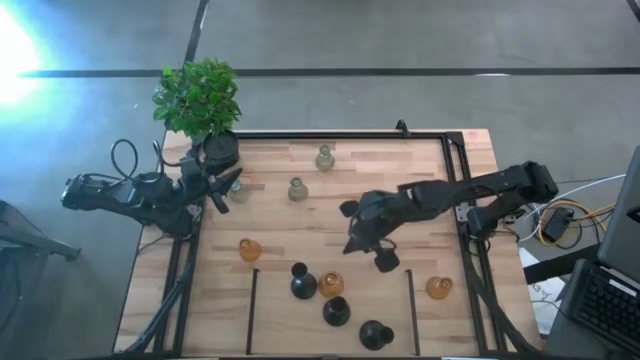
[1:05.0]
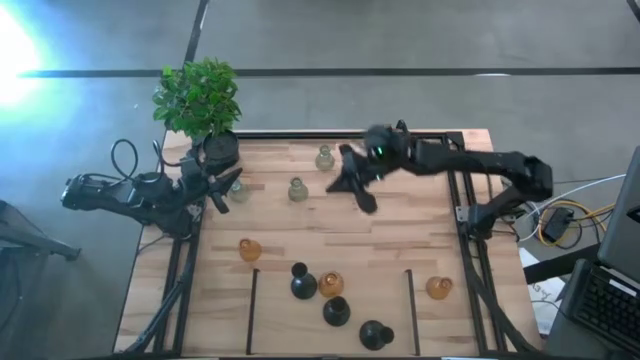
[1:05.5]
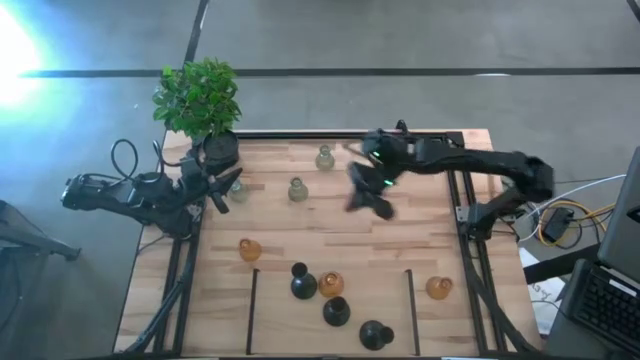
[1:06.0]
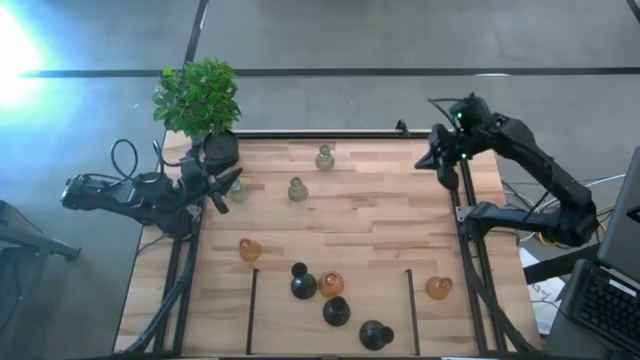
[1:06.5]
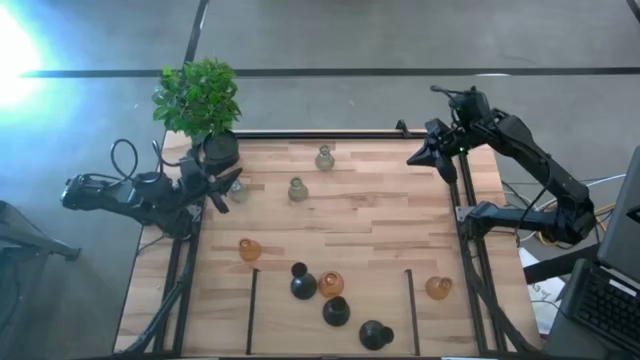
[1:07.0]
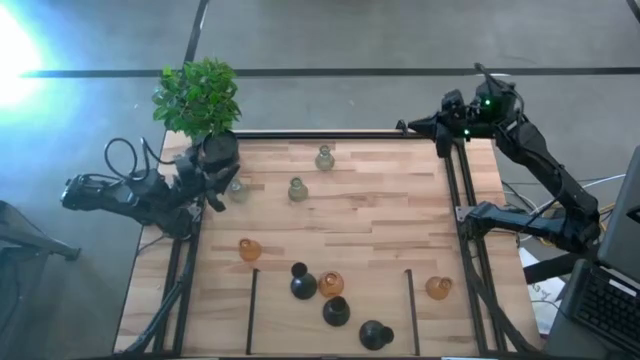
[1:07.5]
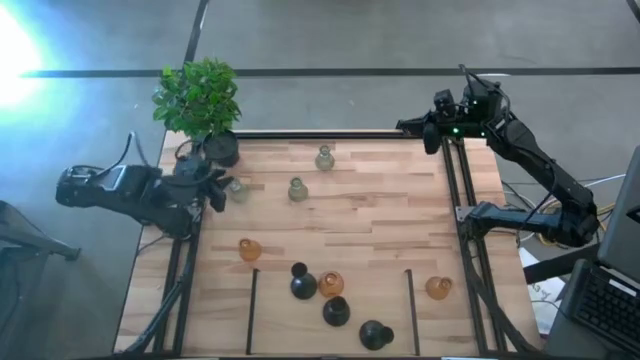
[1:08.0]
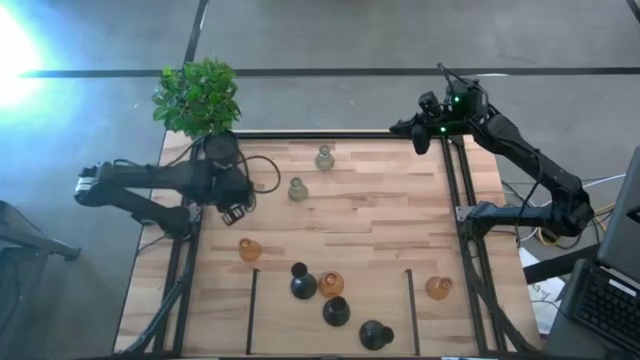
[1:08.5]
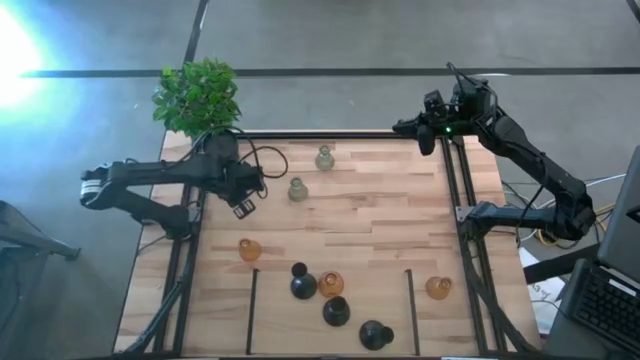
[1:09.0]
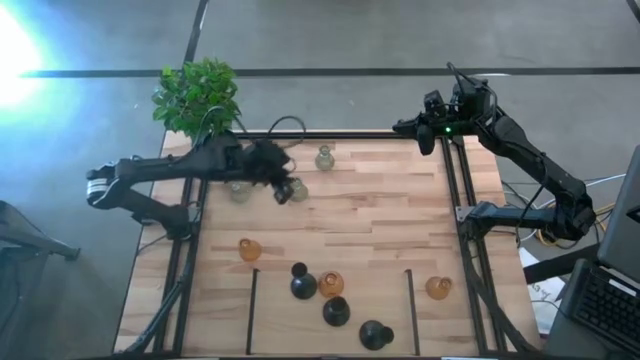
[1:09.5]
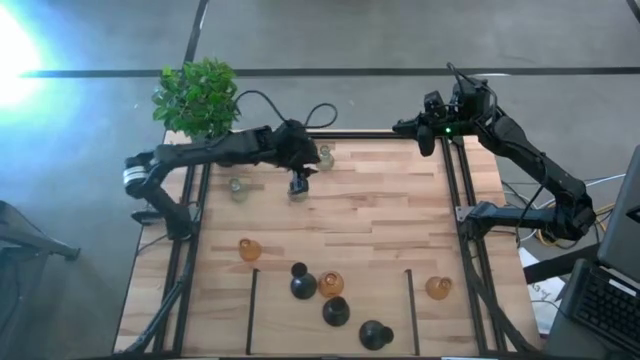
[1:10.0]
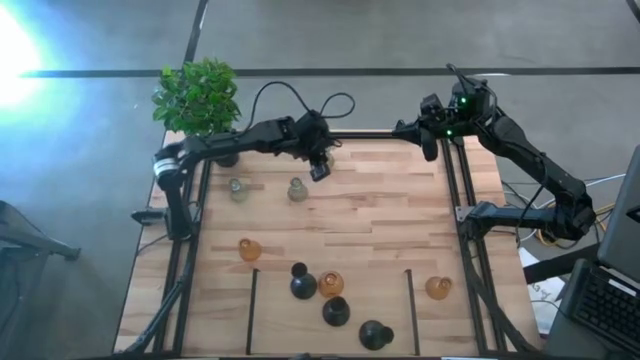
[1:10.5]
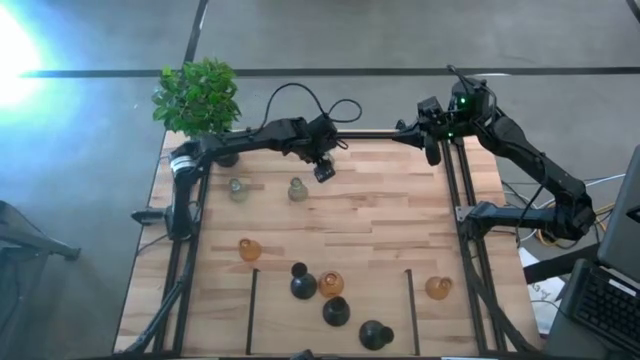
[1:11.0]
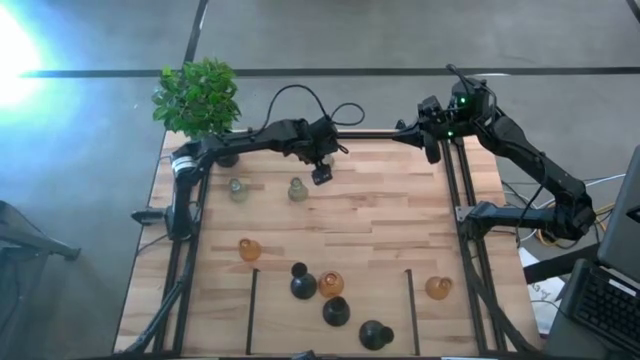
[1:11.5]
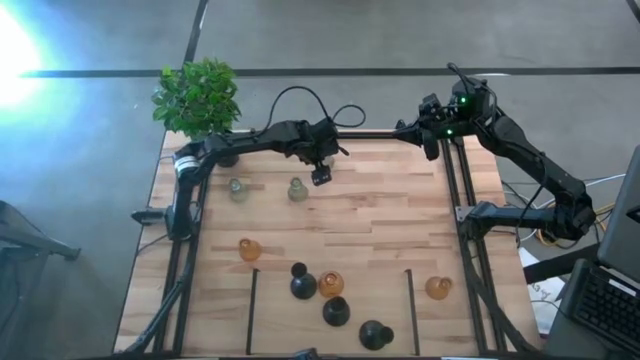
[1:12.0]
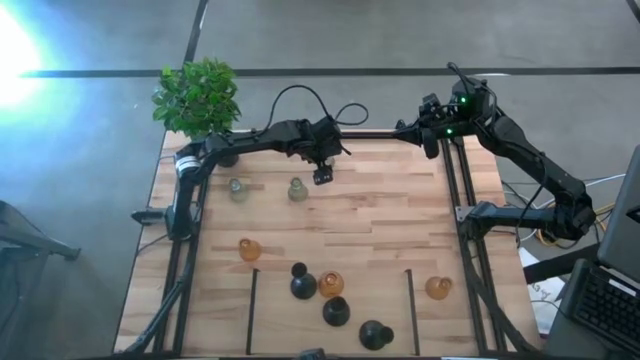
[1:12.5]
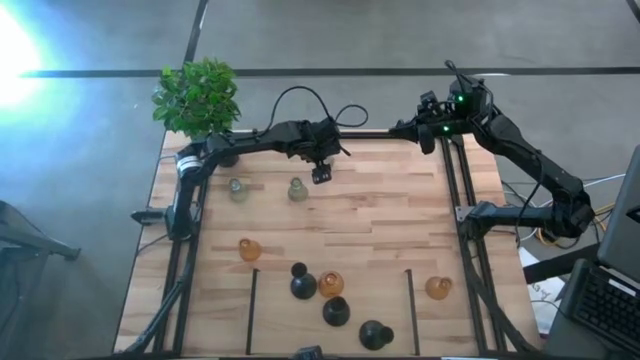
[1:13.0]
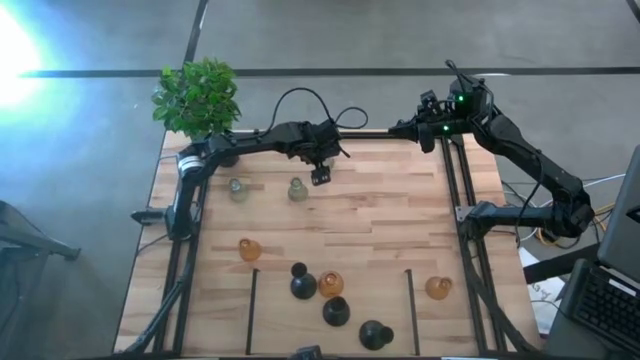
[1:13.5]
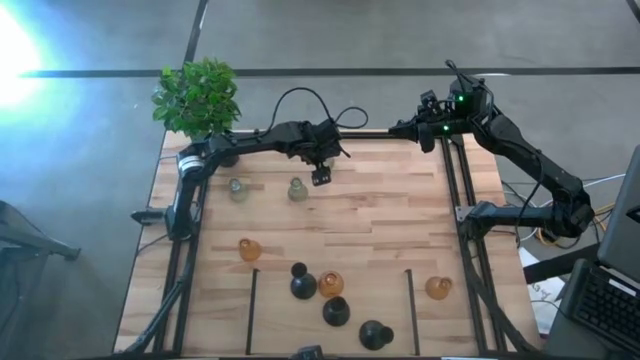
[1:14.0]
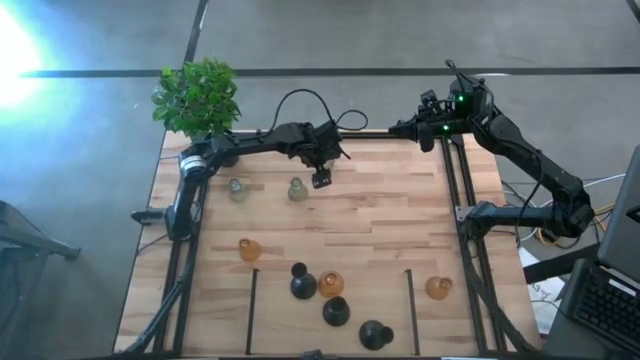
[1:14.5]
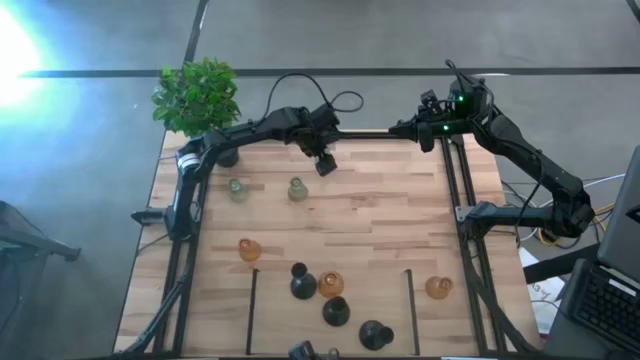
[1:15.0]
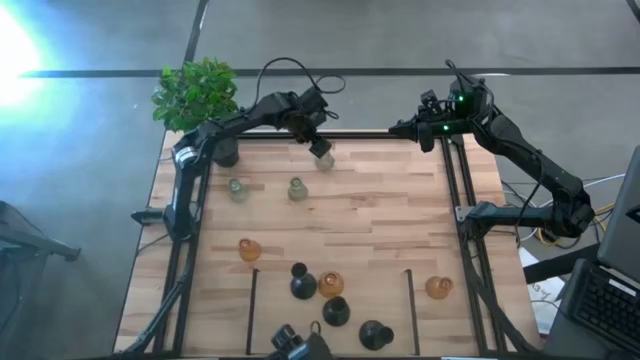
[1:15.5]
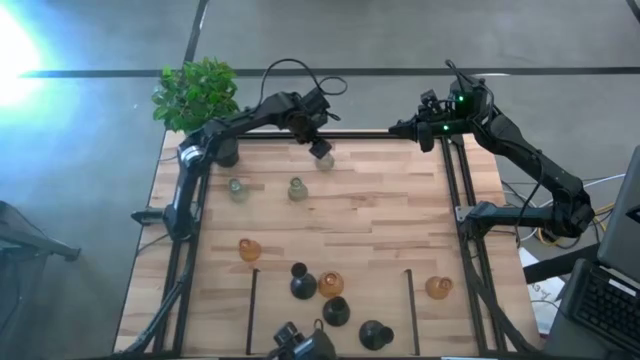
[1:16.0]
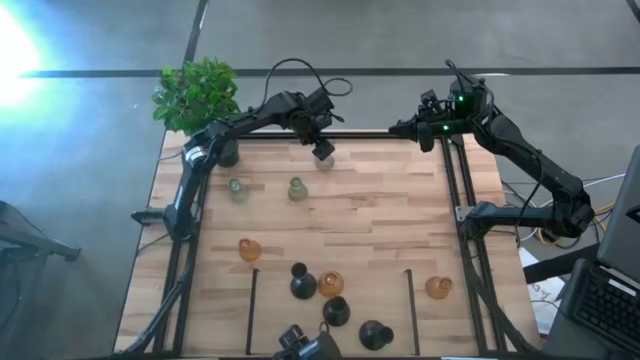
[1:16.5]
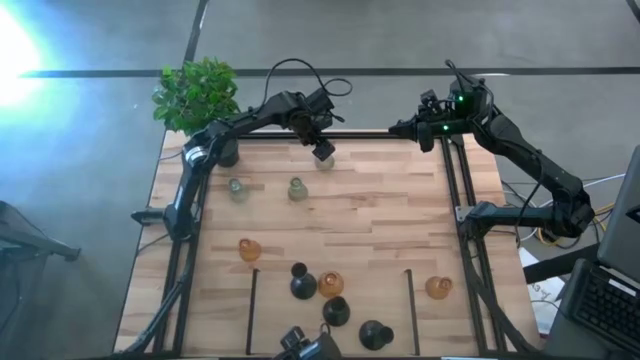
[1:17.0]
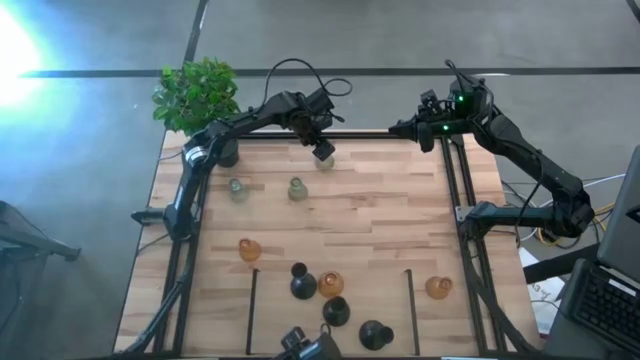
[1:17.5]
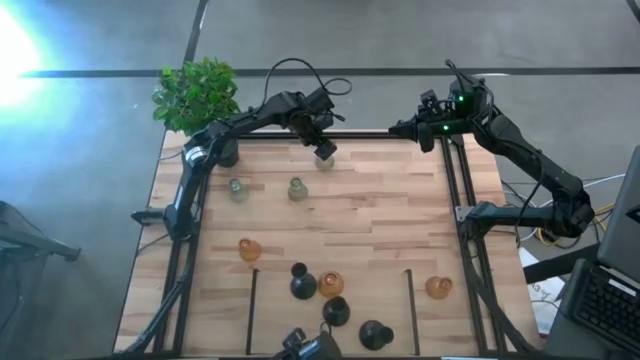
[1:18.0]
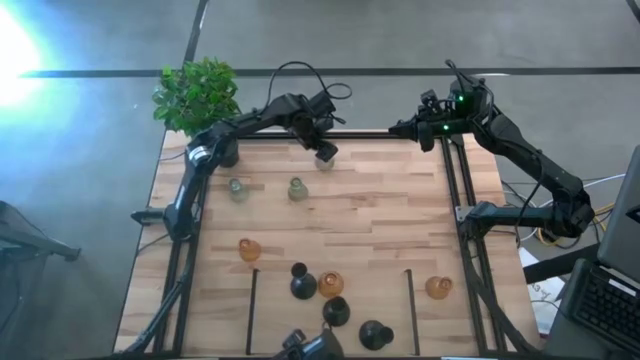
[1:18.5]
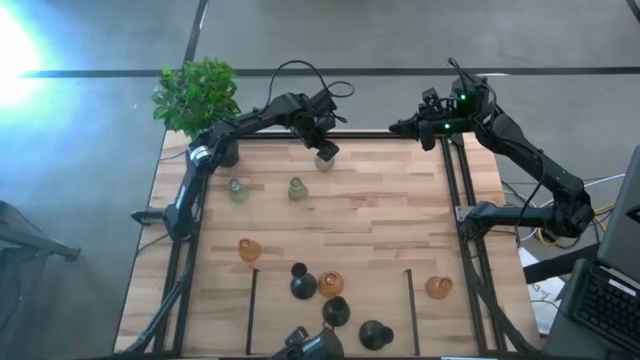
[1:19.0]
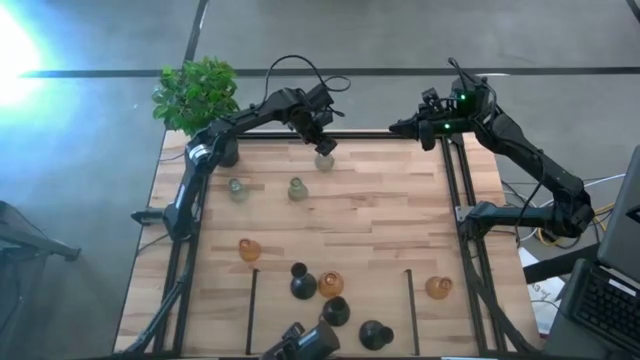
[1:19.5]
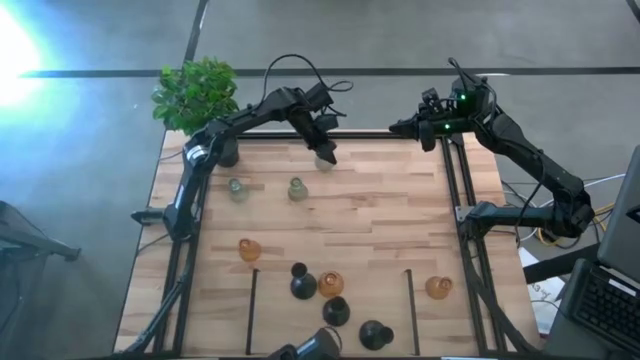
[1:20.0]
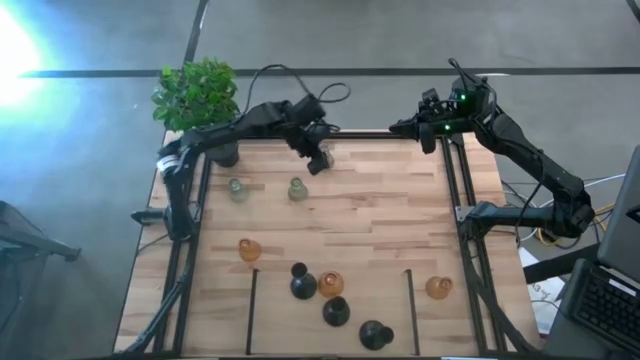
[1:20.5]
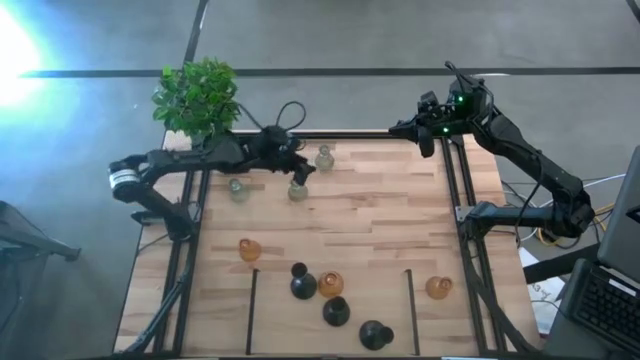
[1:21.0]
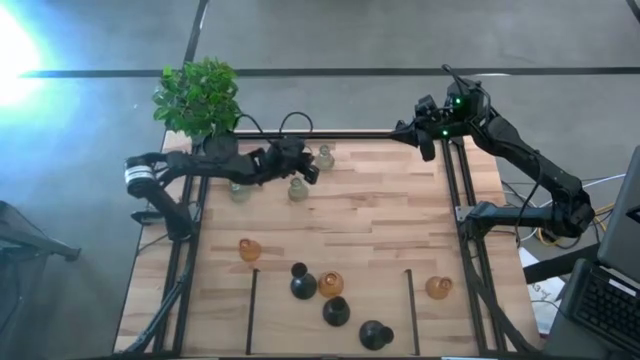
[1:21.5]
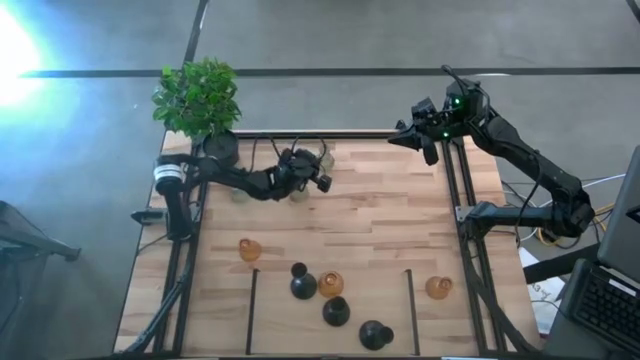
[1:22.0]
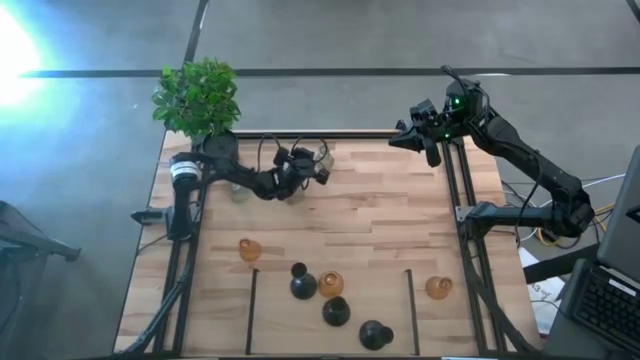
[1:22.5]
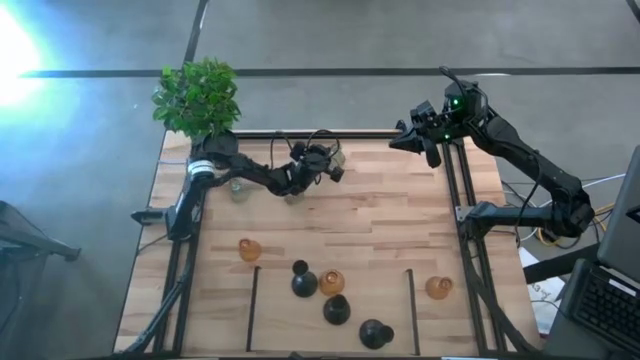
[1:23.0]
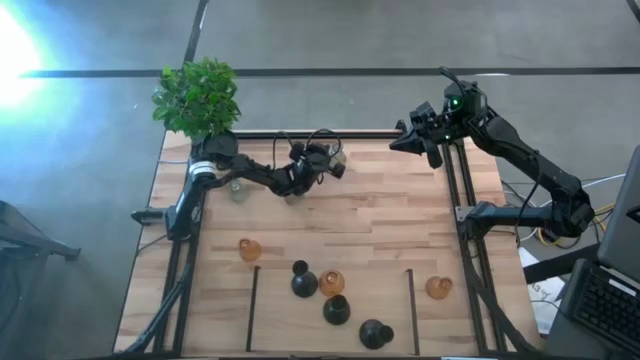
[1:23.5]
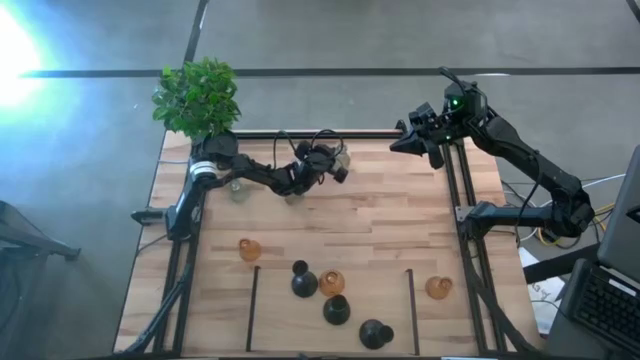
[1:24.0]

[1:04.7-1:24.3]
Task: Pick & Place candle stick holders
Adjust the top transparent glass candle holder

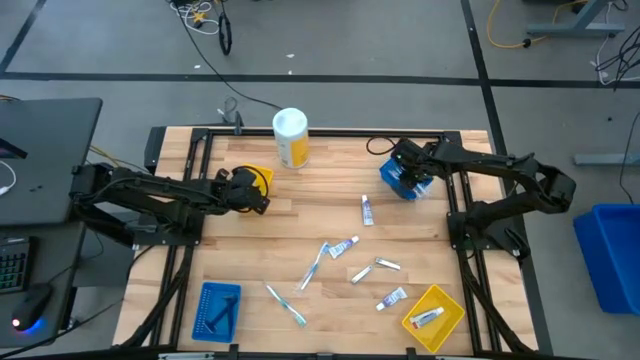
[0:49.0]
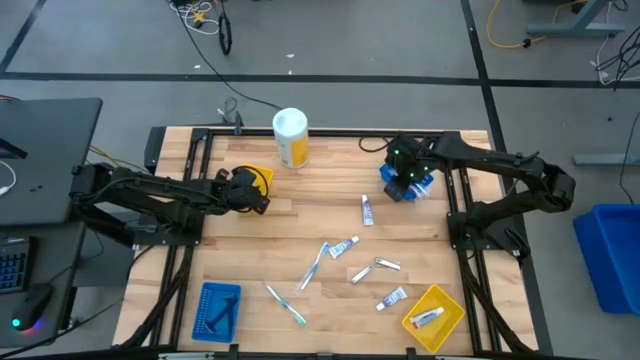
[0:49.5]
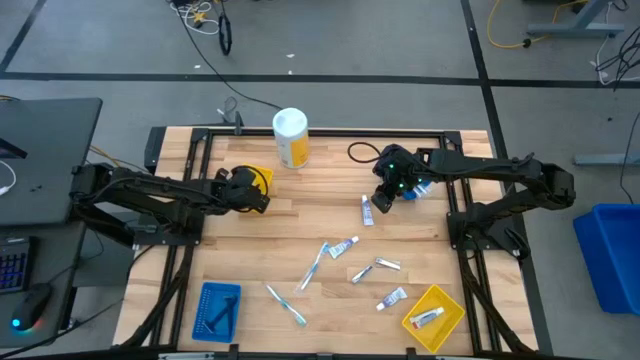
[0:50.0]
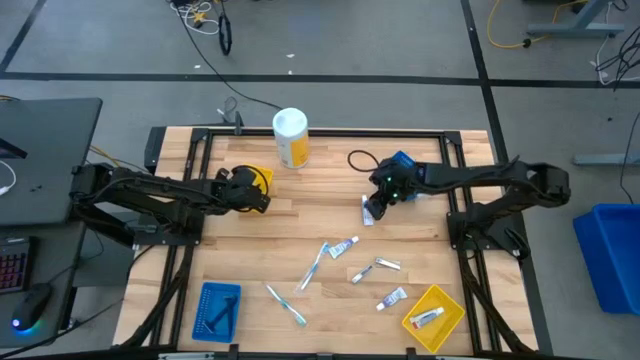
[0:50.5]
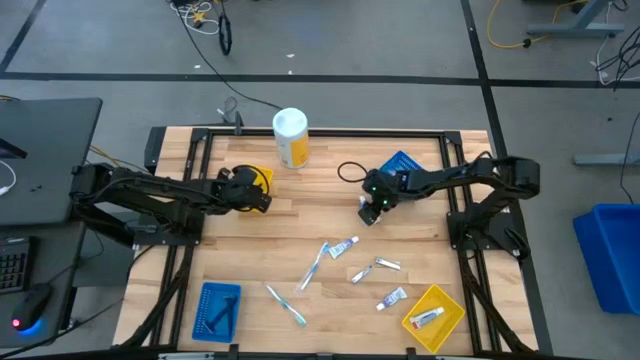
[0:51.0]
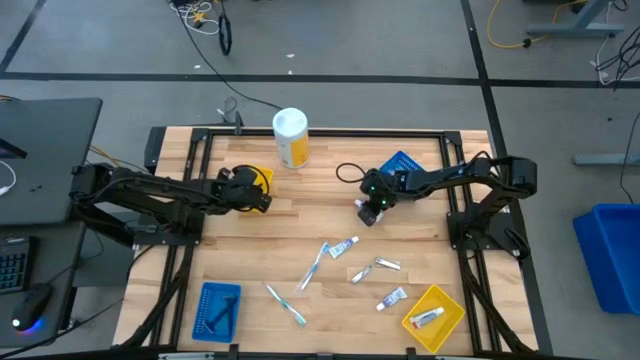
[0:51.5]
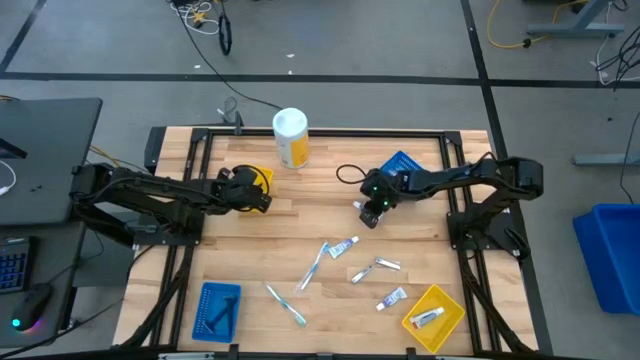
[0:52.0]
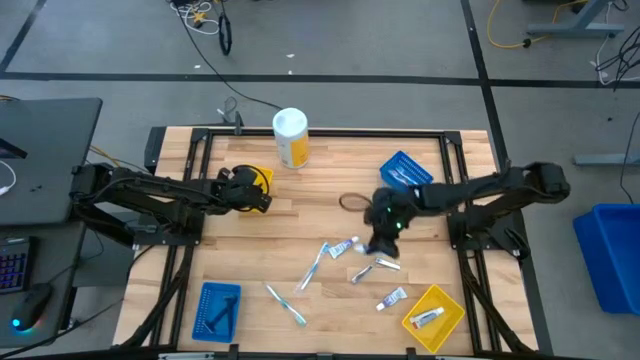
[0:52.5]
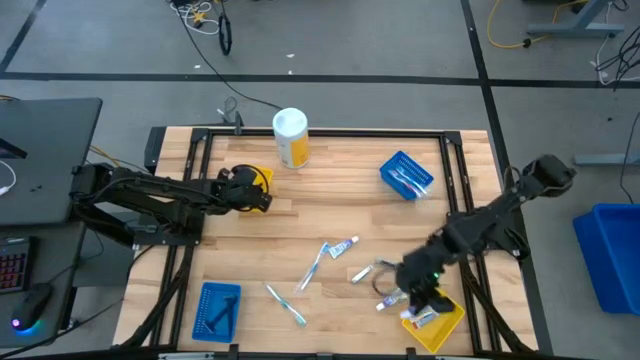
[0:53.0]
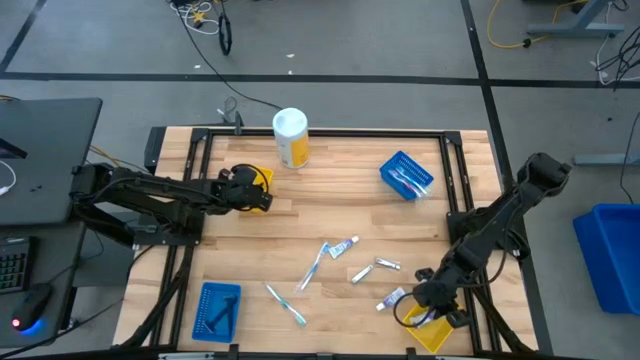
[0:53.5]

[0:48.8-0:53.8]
Task: Pick & Place Travel size toiletries
Put the white toothpaste into the bottom yellow bin
